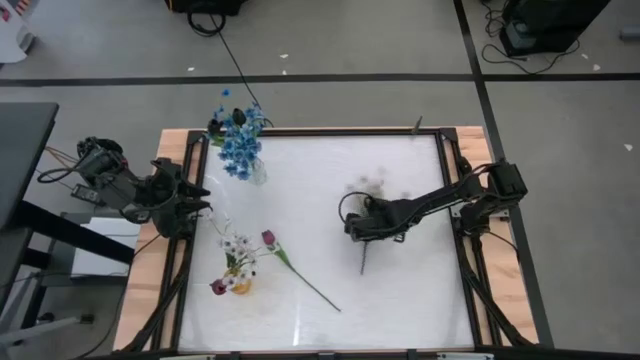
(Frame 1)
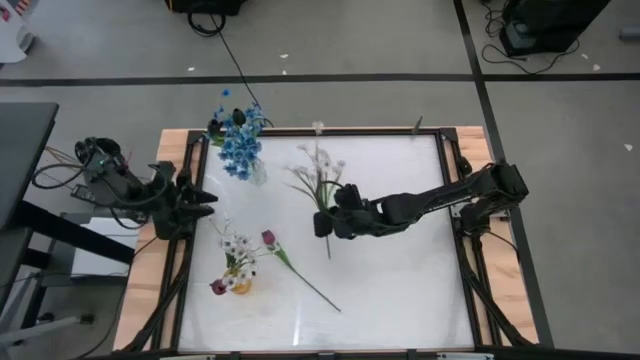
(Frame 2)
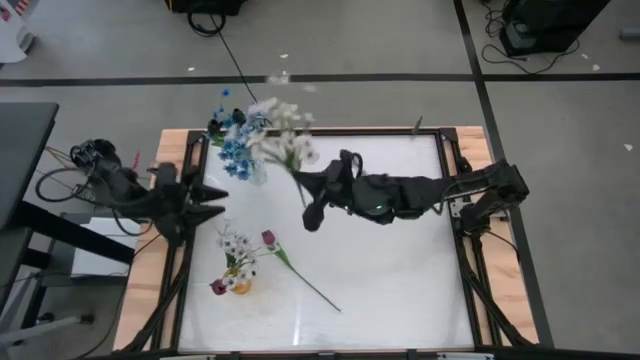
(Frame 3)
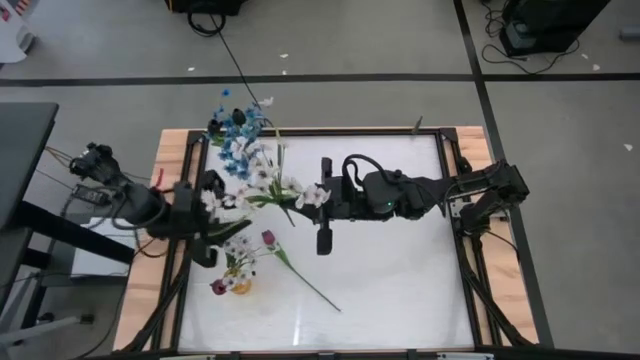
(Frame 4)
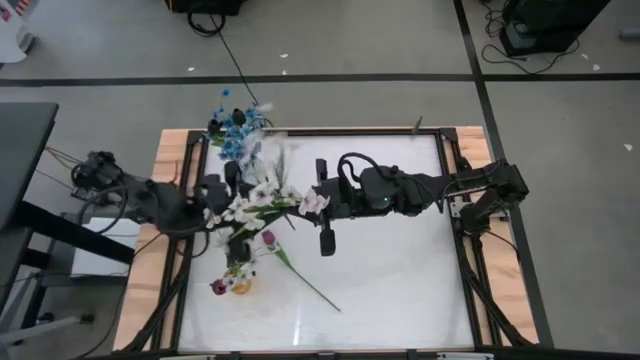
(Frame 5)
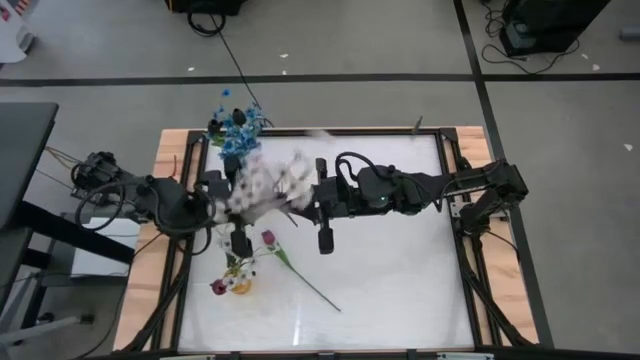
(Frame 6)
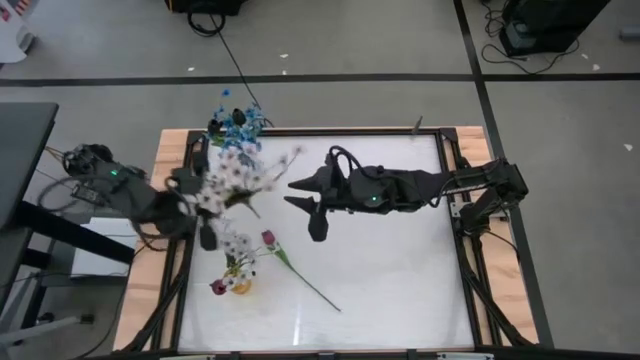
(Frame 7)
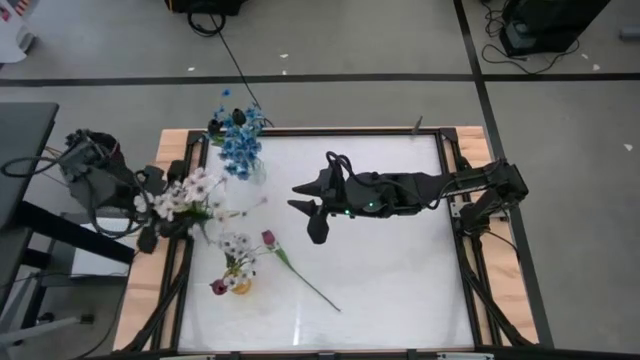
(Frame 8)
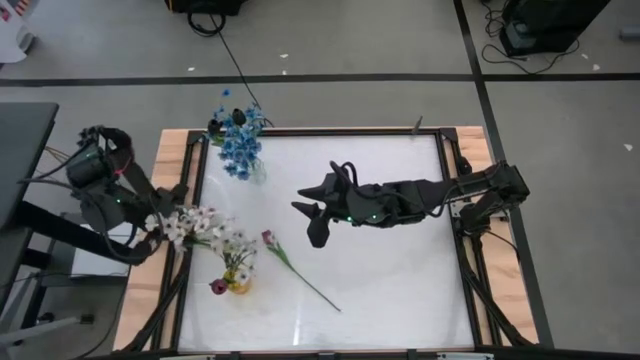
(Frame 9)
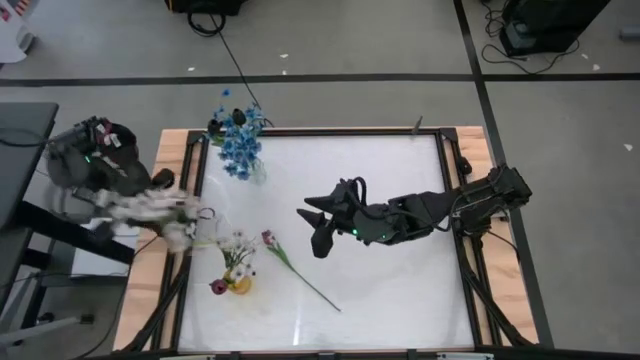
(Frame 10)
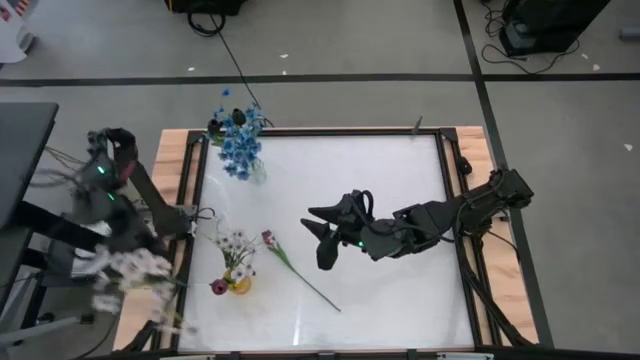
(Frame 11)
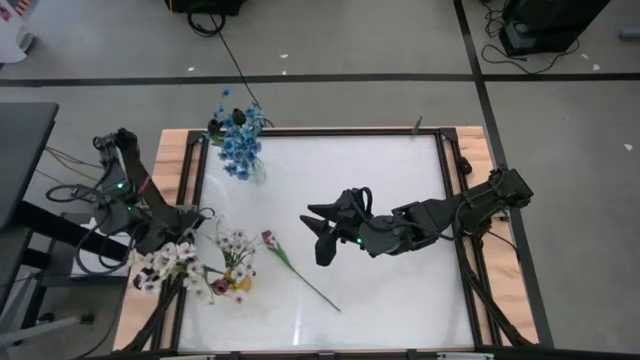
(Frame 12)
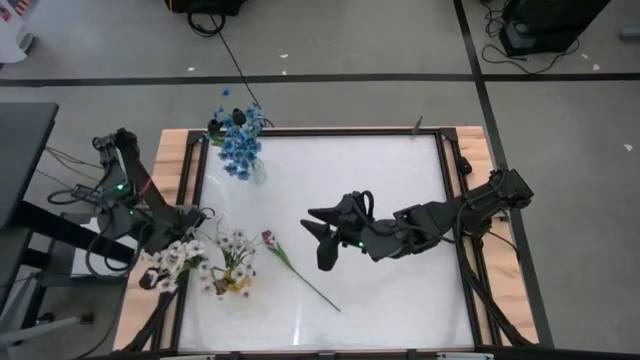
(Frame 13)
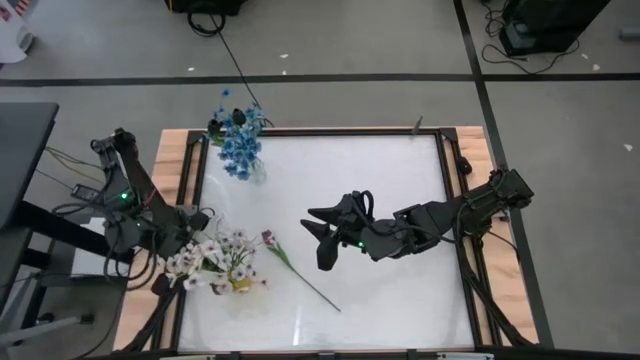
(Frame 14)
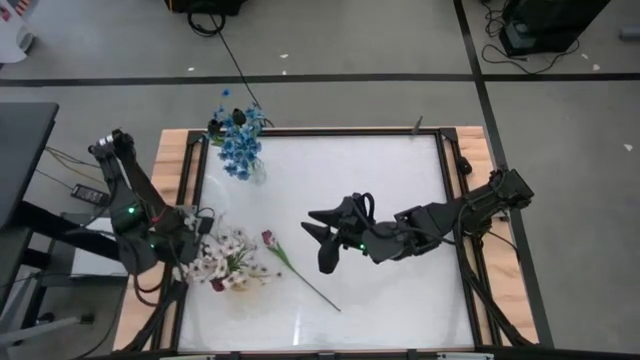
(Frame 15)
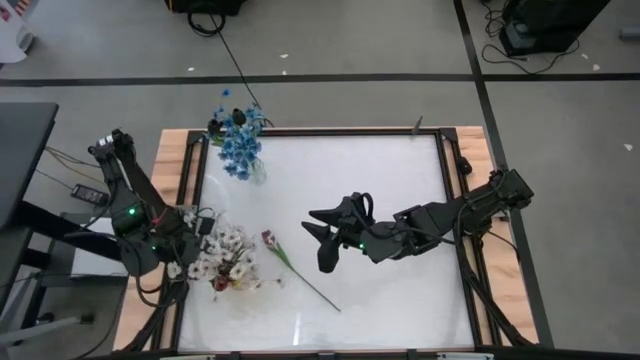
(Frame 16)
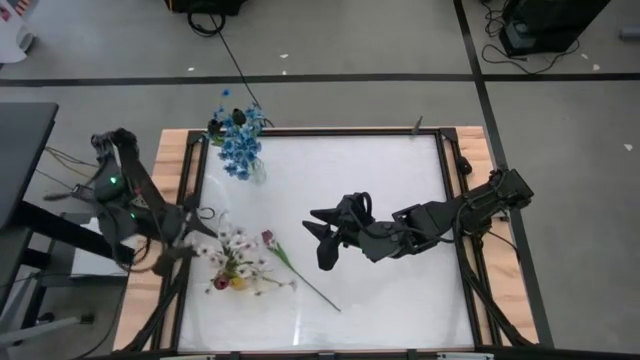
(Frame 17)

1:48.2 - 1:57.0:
Task: Sort flowers into vase by color
Put the white flowers into the yellow vase

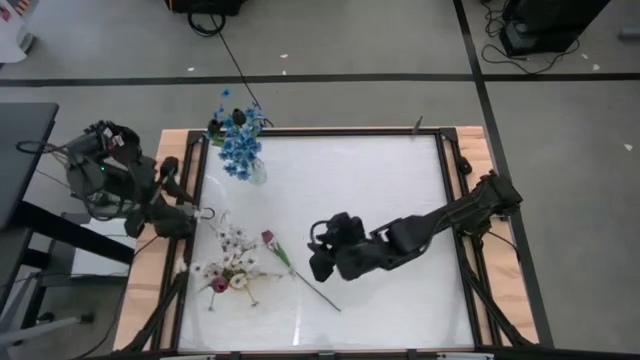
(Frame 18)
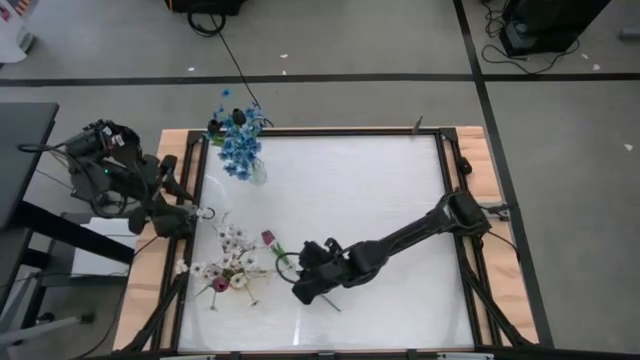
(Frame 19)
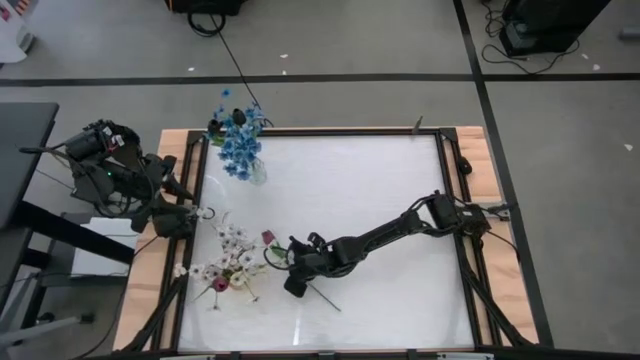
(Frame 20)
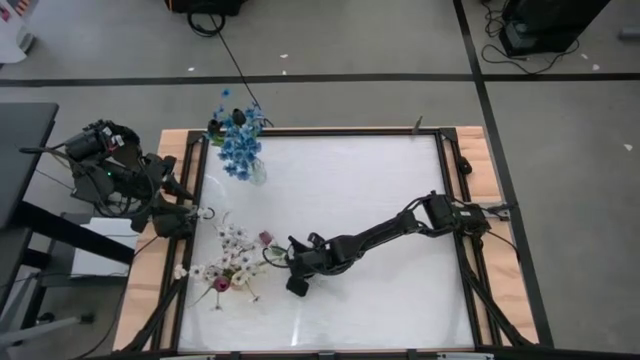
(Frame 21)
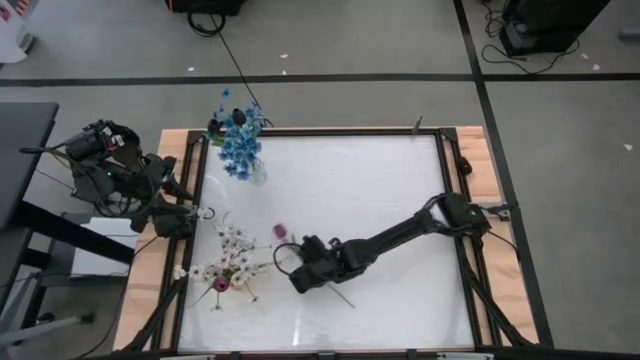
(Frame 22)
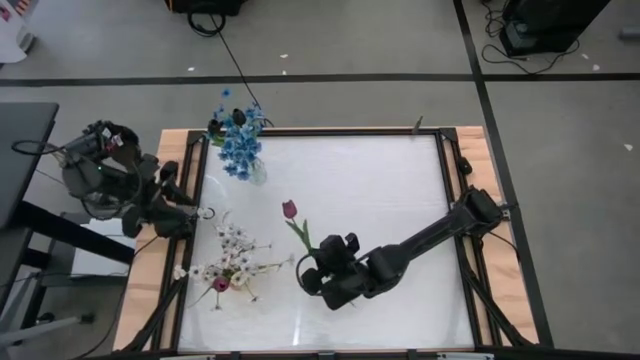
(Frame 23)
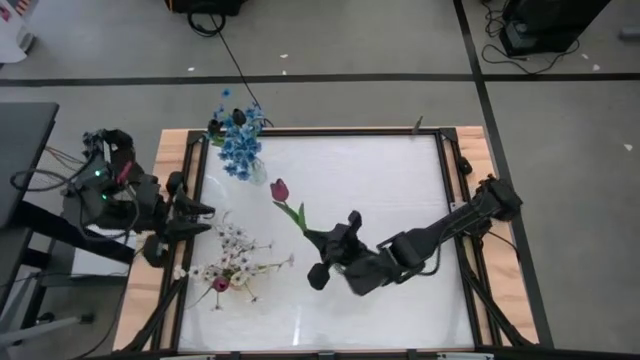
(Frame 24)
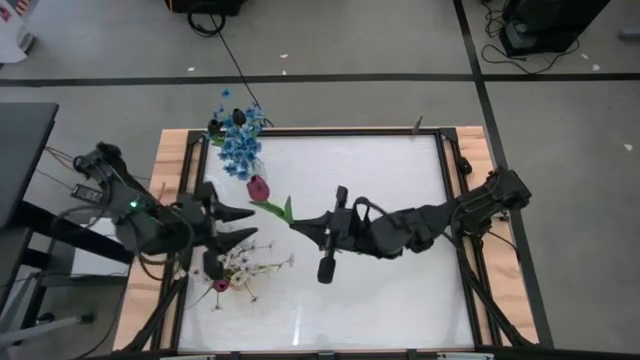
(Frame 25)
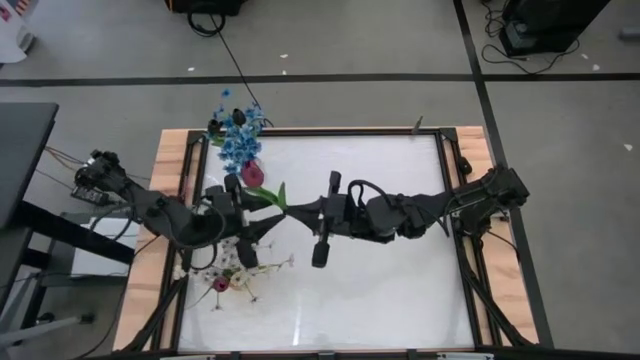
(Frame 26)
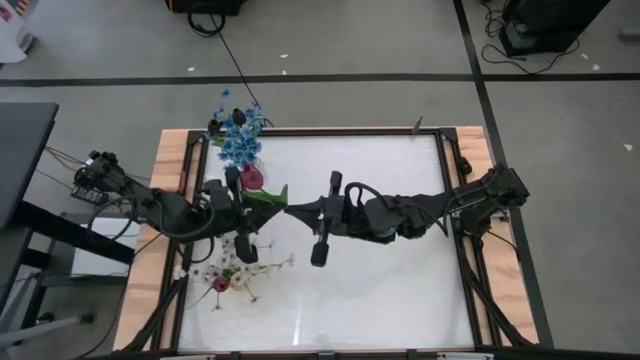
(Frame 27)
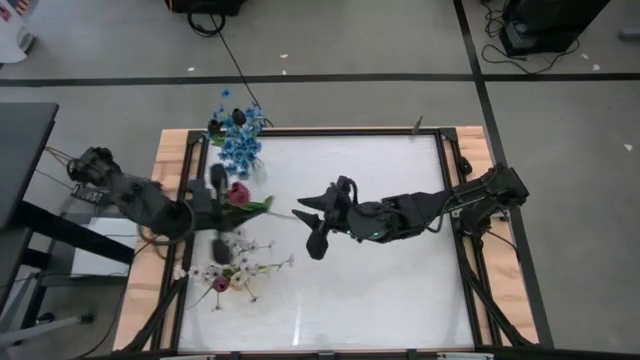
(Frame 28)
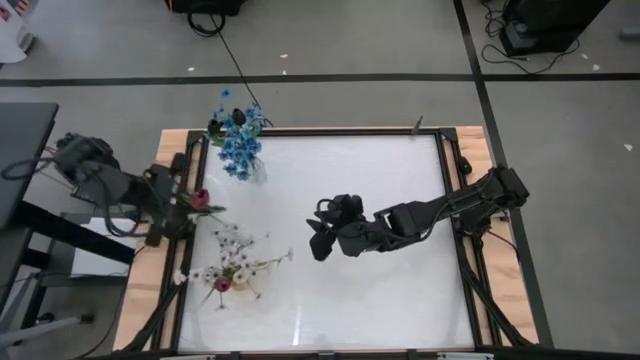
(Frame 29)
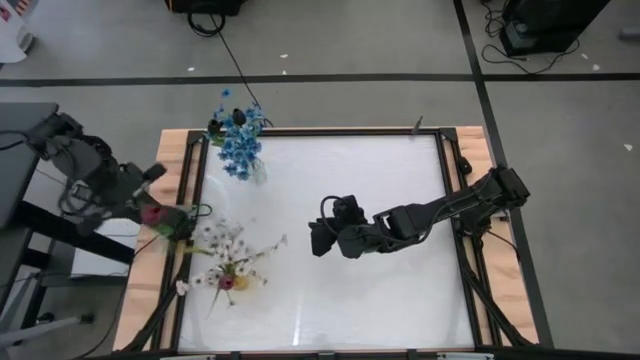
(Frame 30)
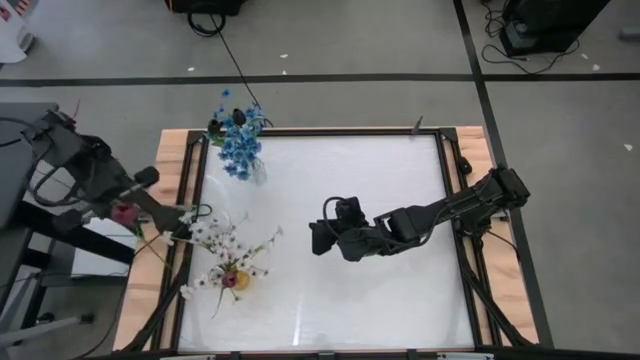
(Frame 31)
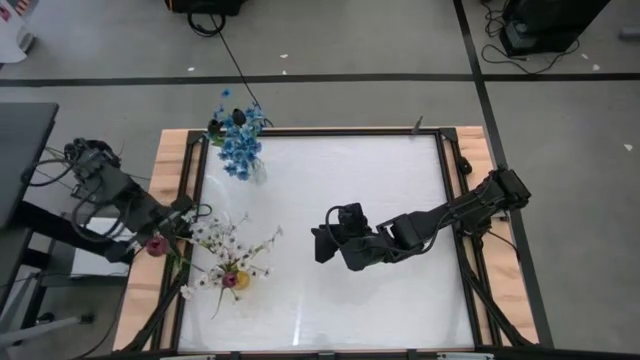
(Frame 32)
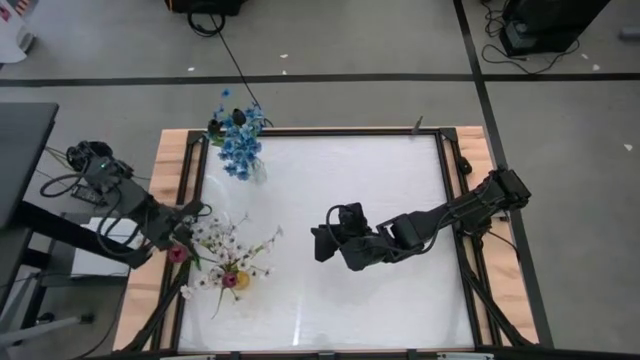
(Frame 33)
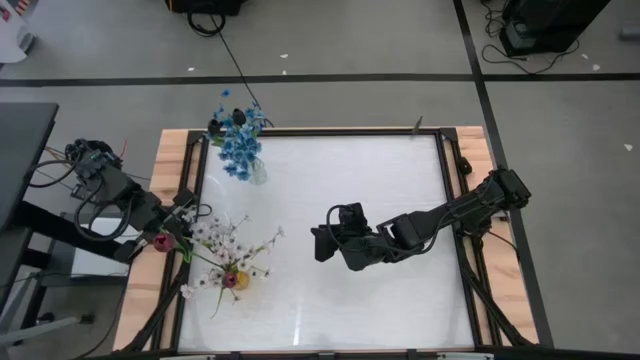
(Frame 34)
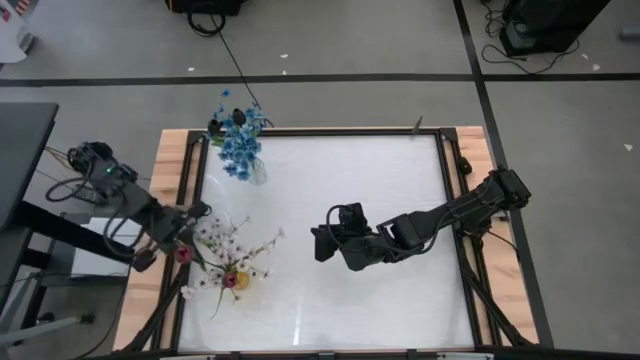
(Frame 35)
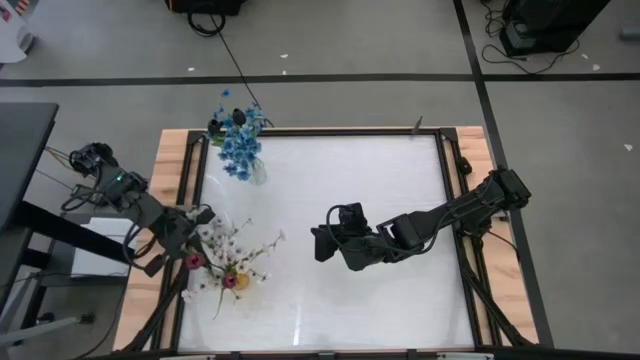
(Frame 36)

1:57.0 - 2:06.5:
Put the red tulip into the yellow vase
